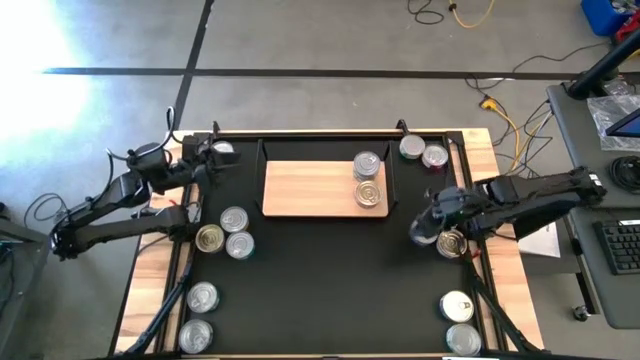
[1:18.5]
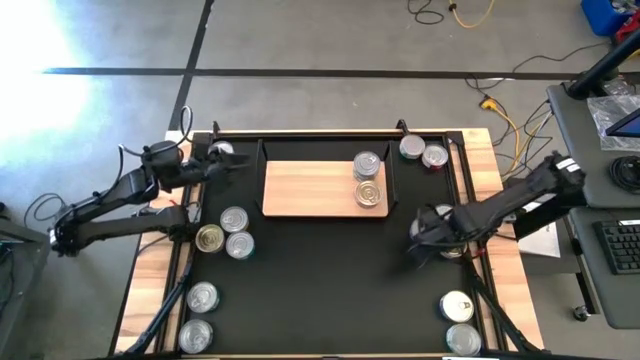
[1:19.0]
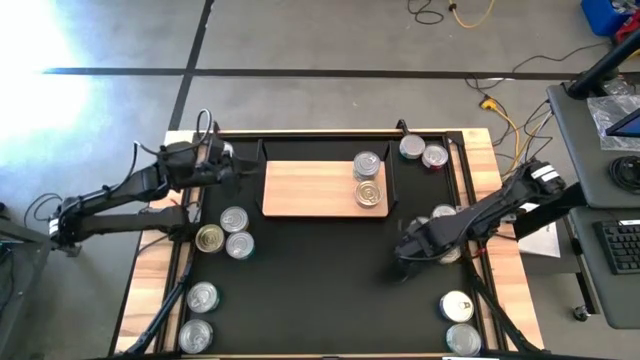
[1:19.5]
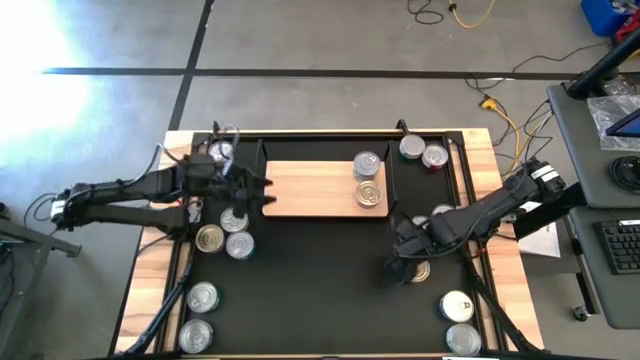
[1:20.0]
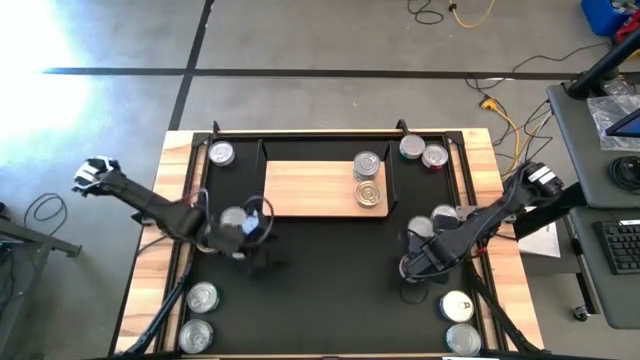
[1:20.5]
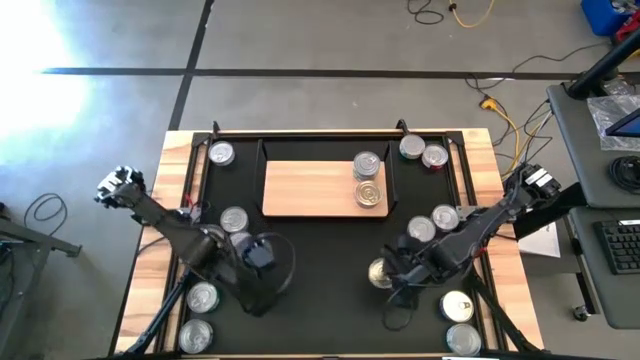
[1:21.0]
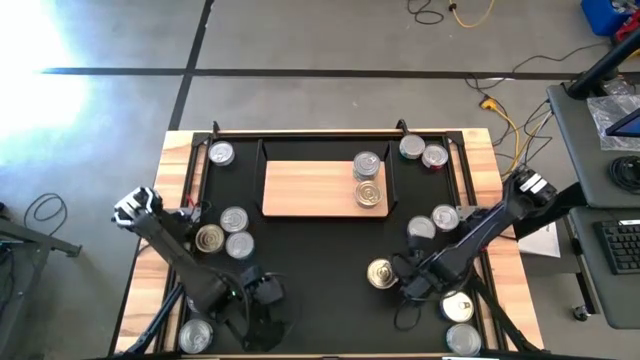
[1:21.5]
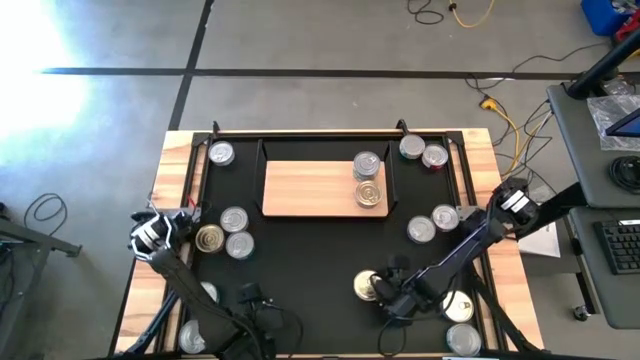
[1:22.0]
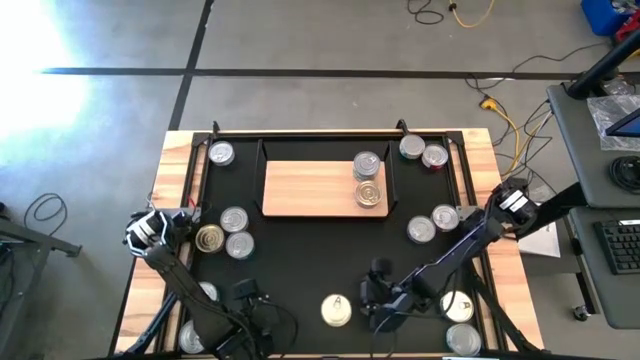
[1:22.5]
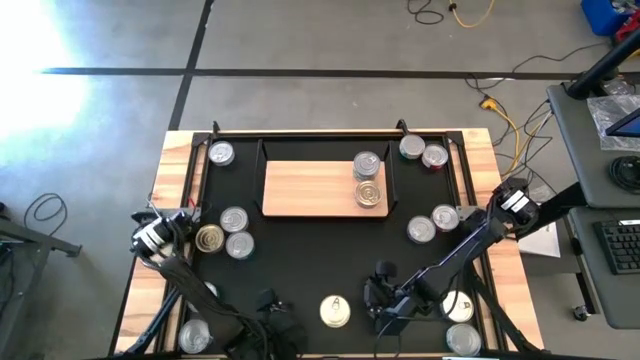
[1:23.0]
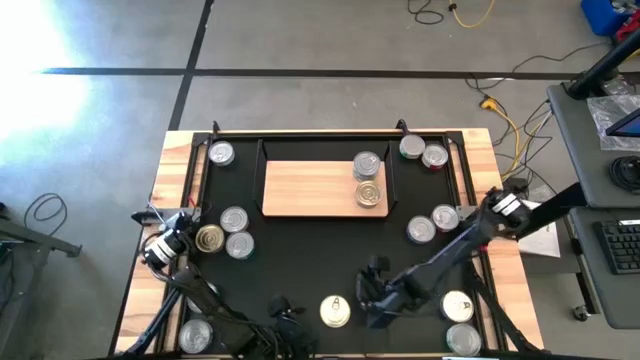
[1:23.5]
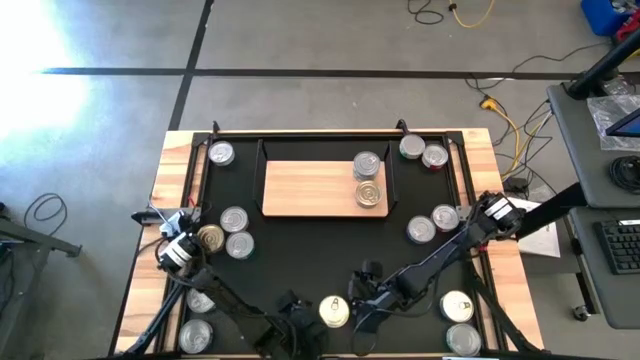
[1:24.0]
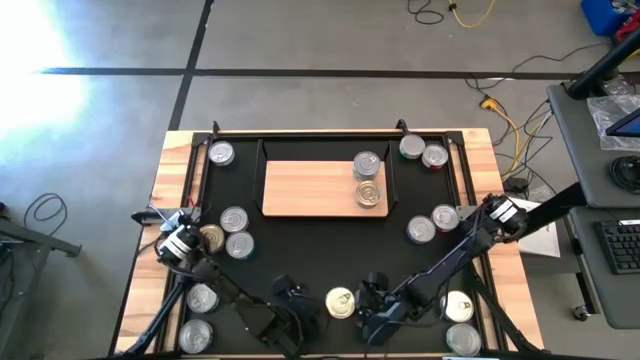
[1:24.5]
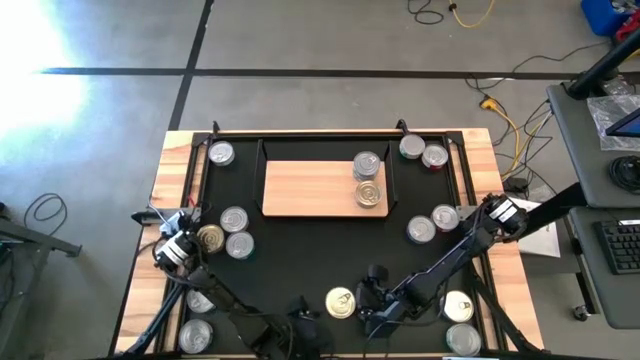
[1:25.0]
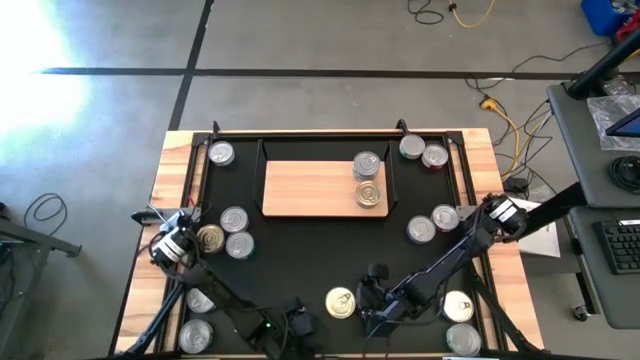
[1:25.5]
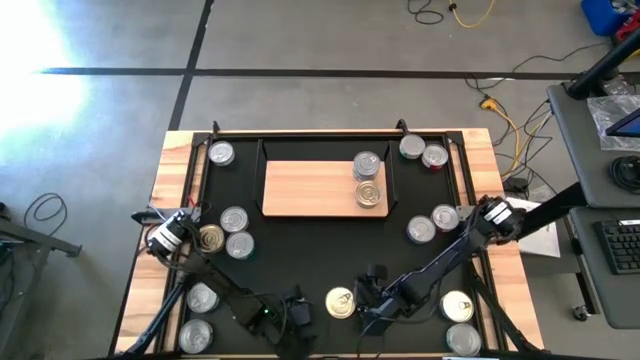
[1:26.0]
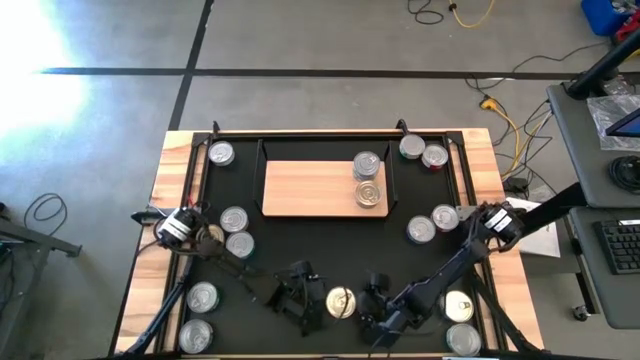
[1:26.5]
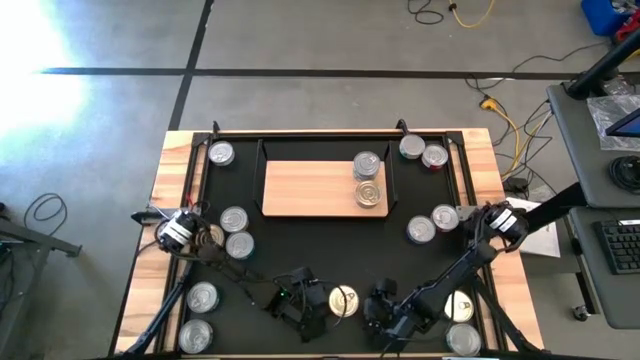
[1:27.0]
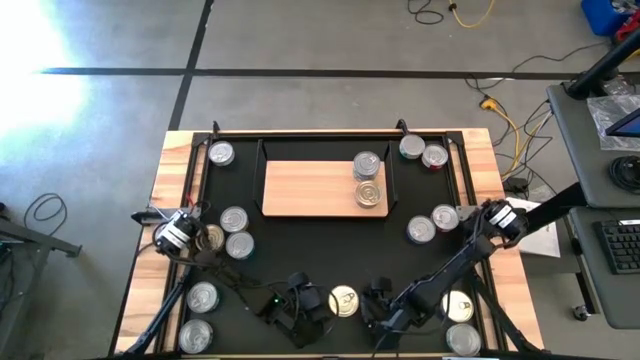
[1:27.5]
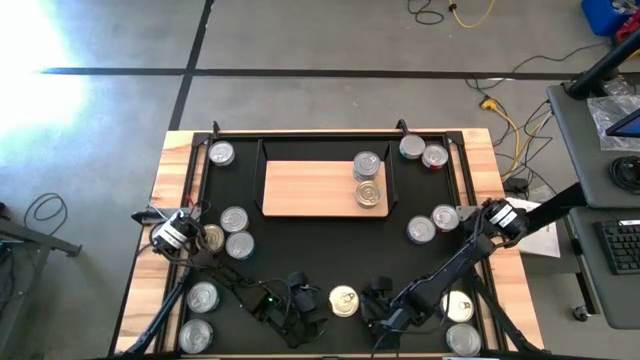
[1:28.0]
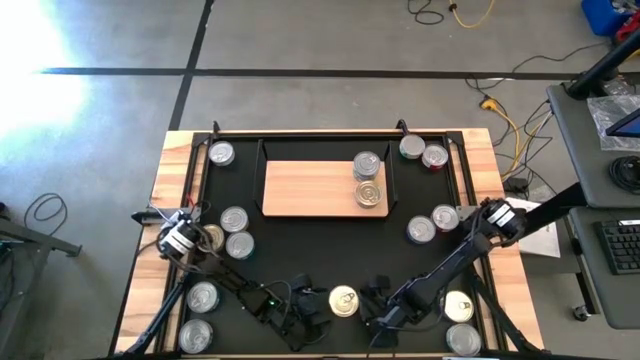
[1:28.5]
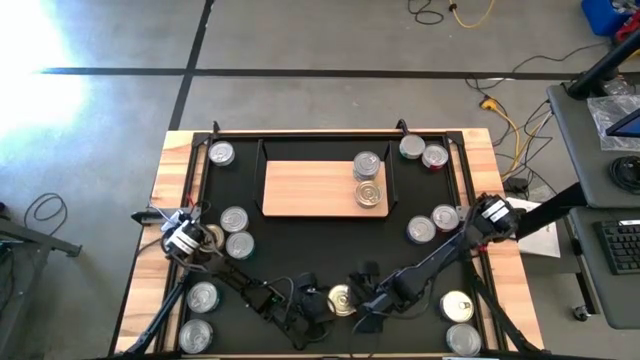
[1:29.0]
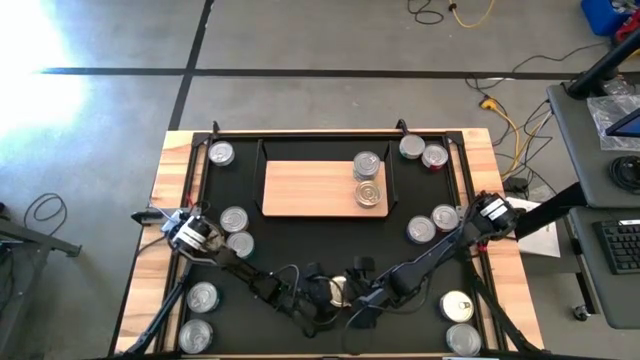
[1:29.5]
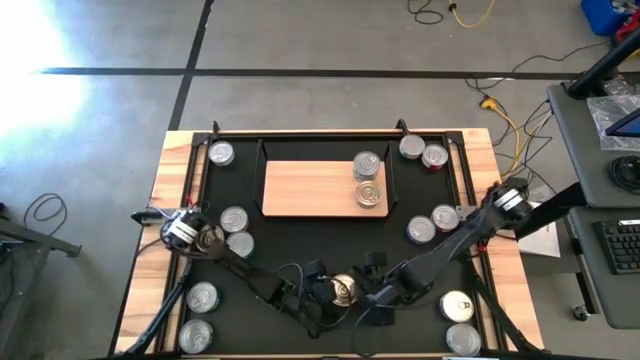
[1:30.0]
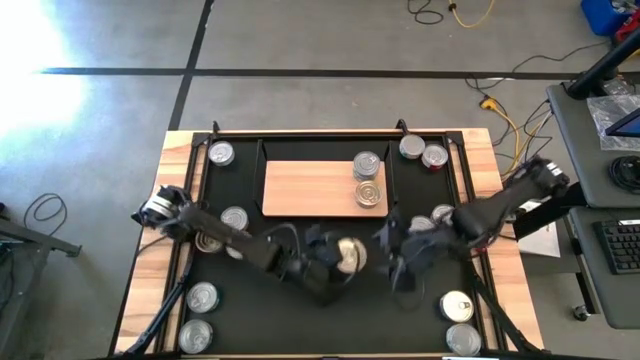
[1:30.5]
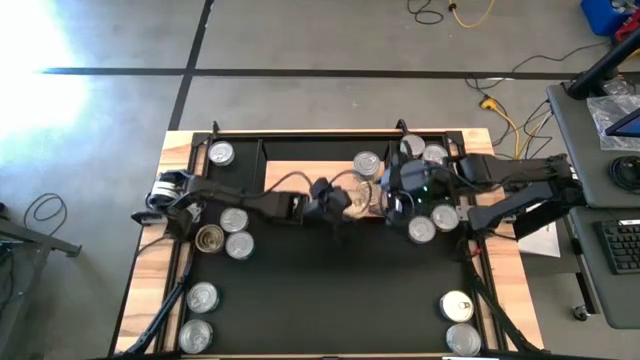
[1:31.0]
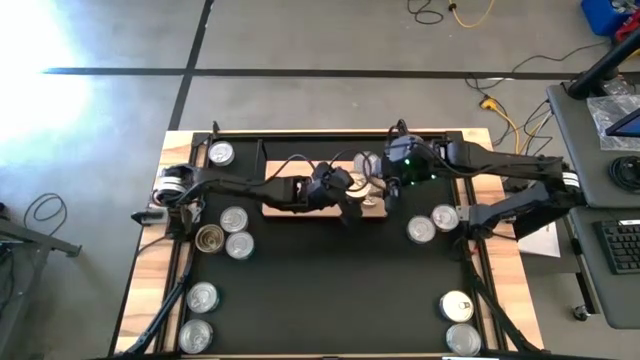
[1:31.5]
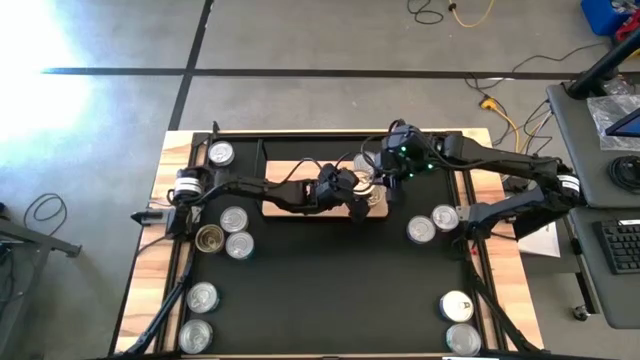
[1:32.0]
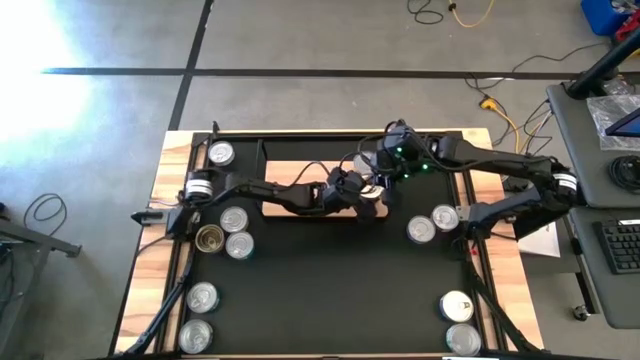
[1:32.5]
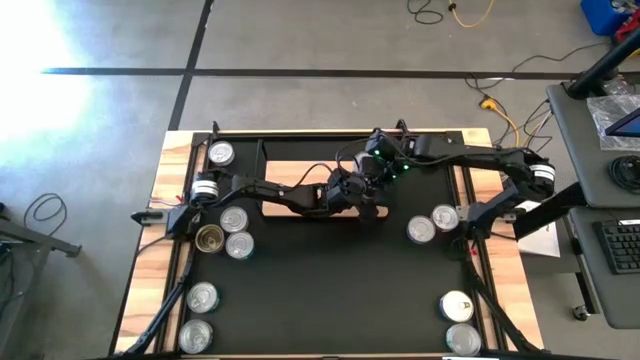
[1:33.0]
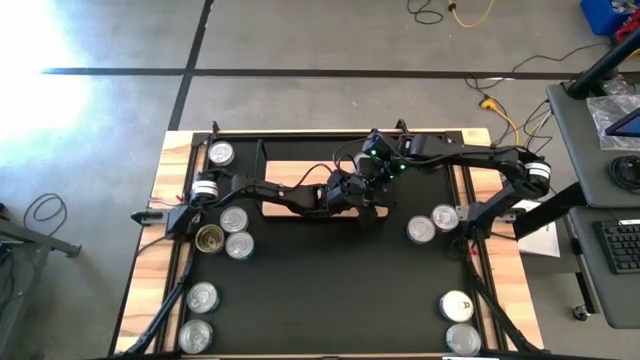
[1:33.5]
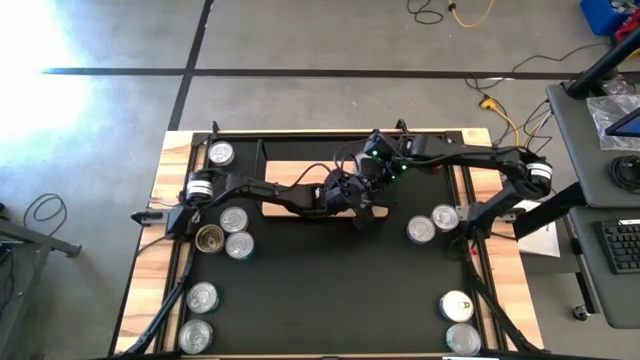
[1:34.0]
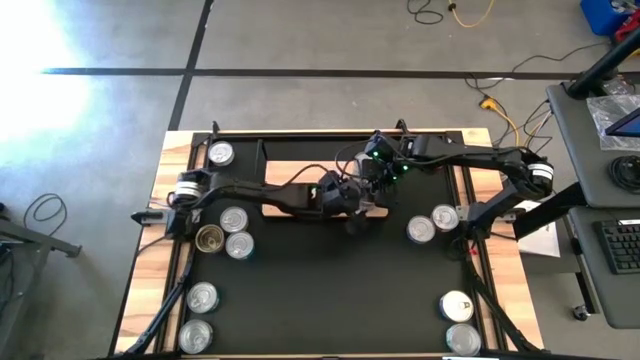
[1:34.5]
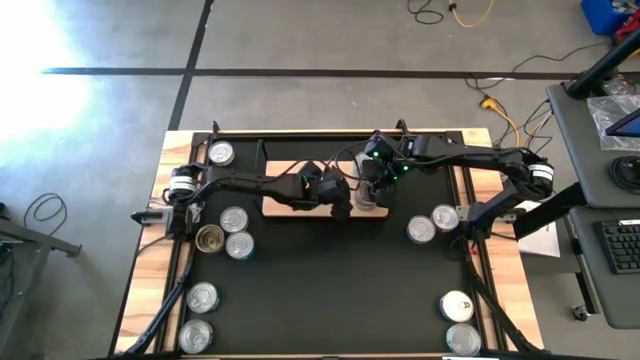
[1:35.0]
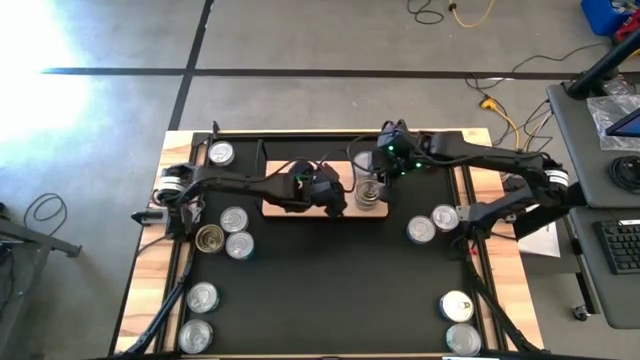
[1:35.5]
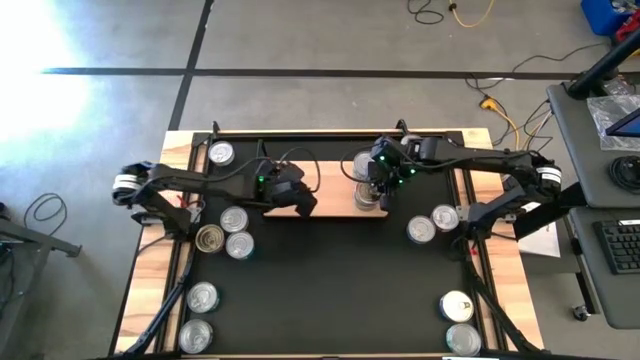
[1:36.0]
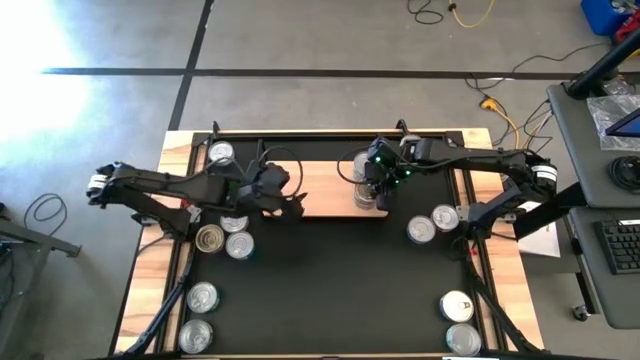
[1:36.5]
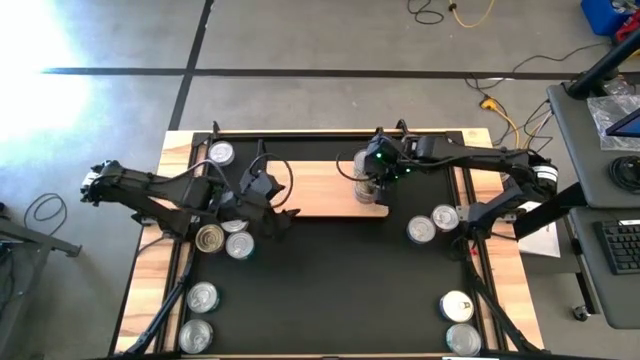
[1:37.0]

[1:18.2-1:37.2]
Task: Stack canned seafood by type on shelf
Stack the middle right blue and orange tuna can on the blue and orange can

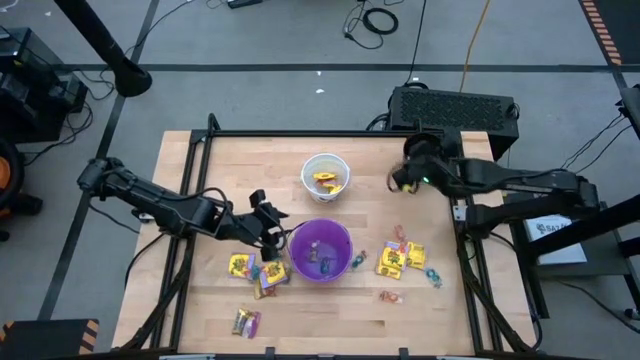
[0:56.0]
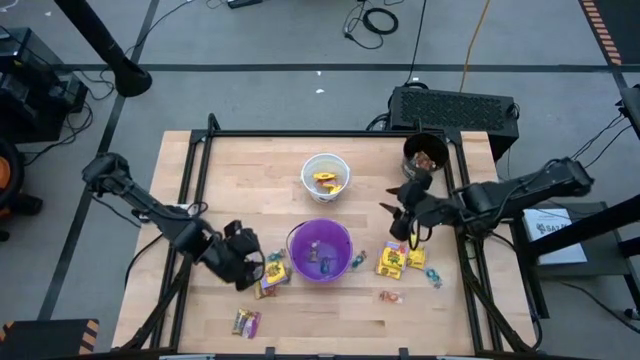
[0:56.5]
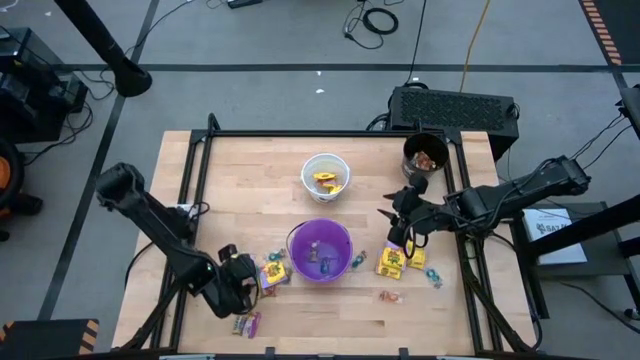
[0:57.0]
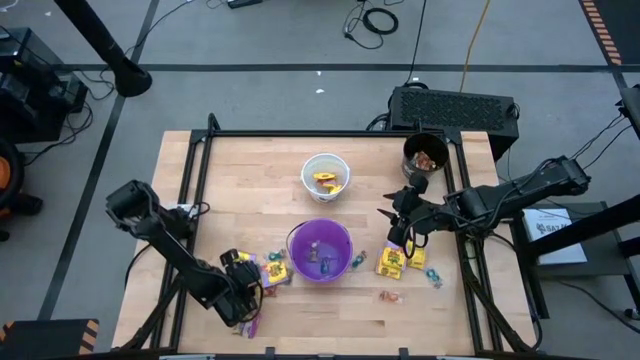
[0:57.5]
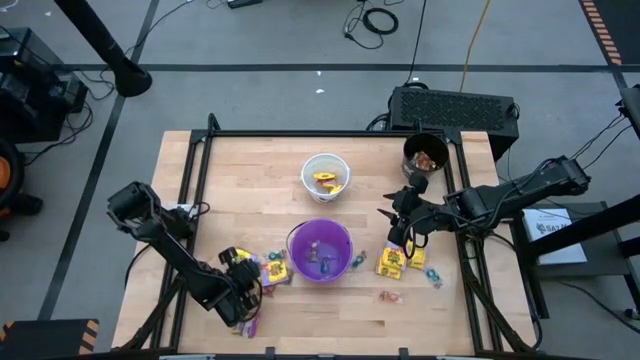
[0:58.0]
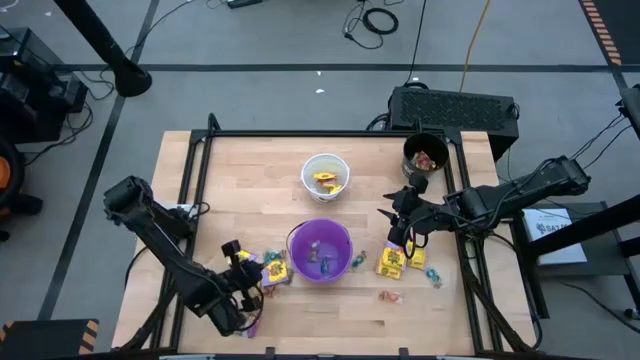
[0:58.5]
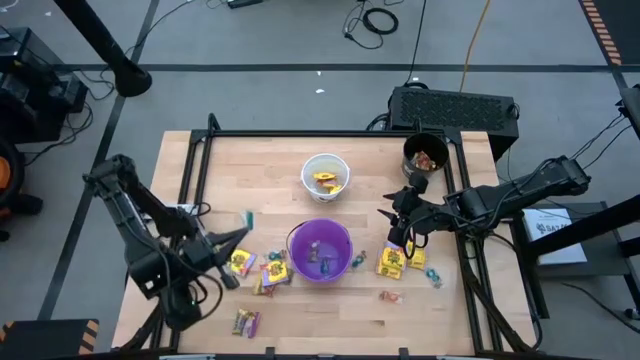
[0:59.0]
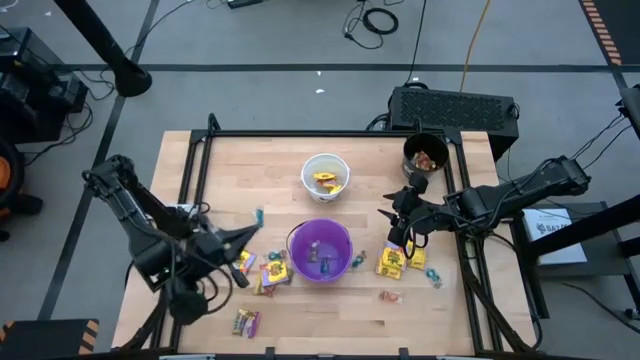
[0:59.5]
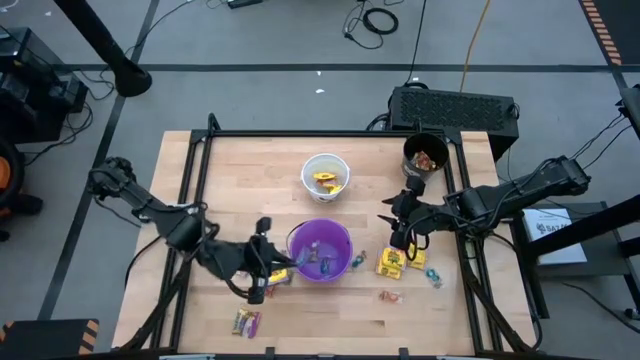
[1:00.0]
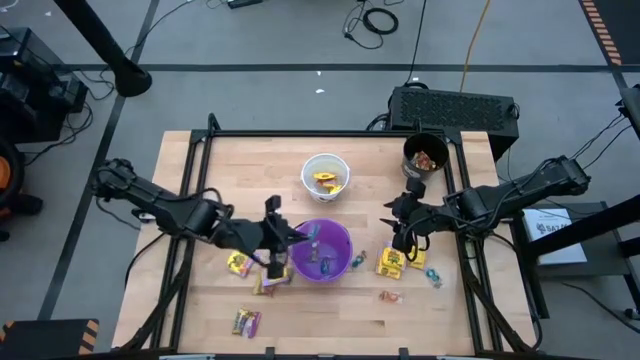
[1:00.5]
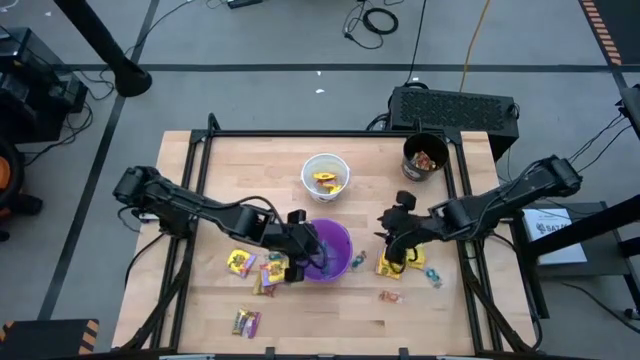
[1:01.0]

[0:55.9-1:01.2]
Task: Sort candy by brand, put in halloween buckets
Put the blue gummy into the violet bucket
